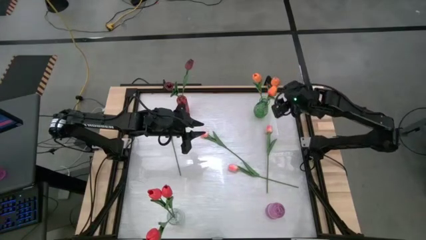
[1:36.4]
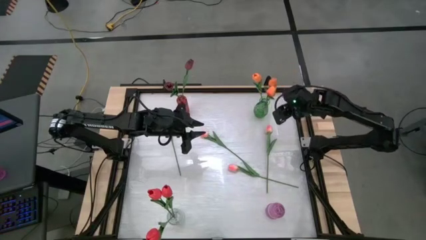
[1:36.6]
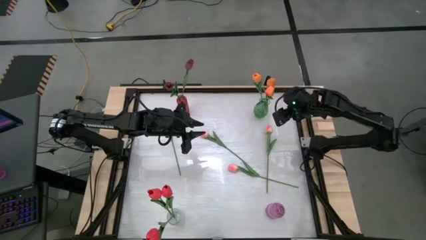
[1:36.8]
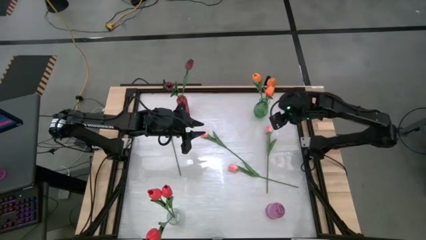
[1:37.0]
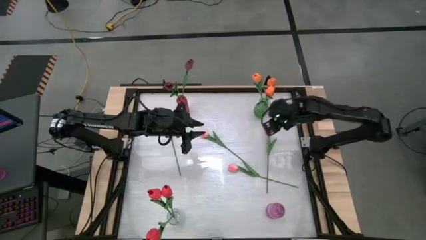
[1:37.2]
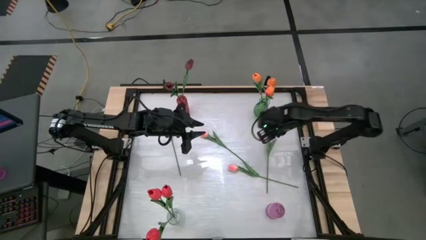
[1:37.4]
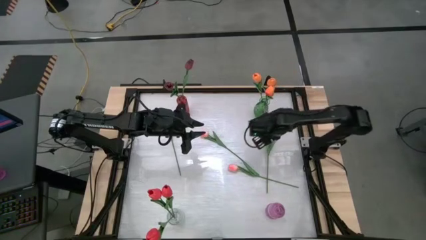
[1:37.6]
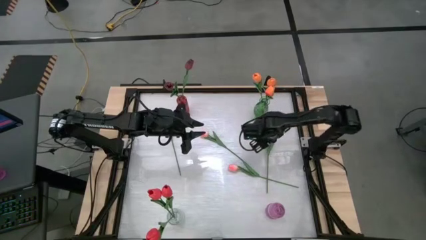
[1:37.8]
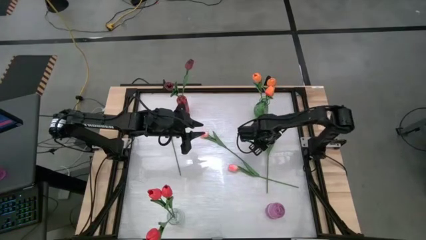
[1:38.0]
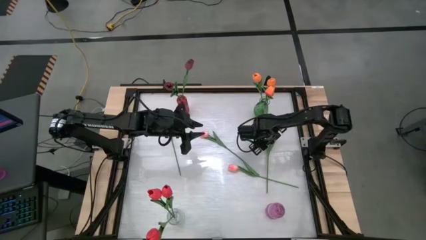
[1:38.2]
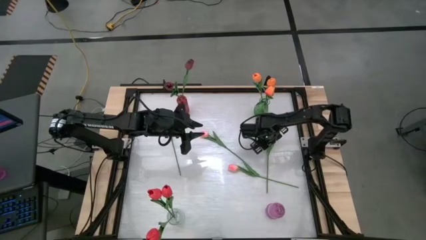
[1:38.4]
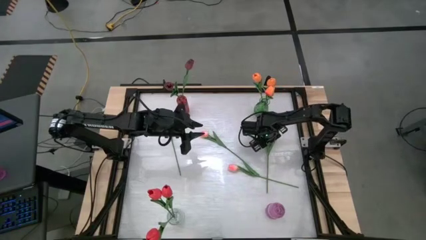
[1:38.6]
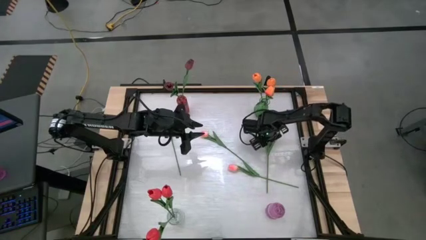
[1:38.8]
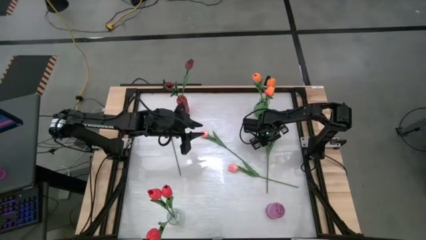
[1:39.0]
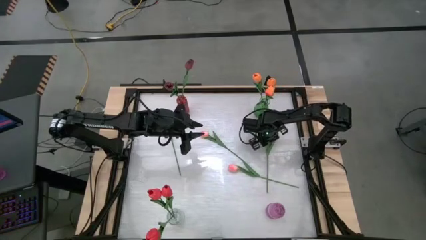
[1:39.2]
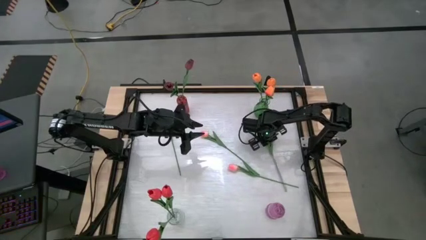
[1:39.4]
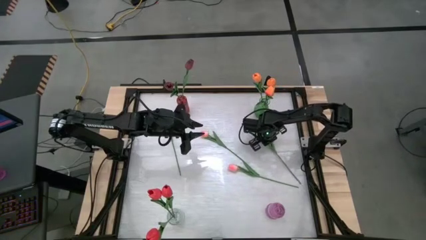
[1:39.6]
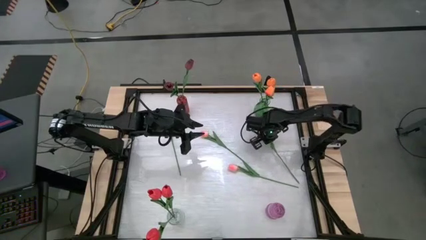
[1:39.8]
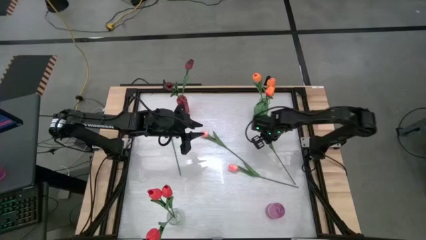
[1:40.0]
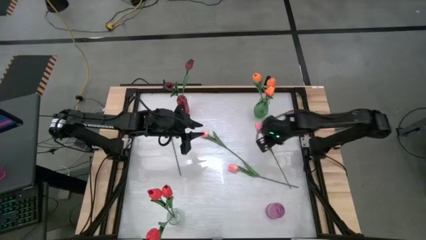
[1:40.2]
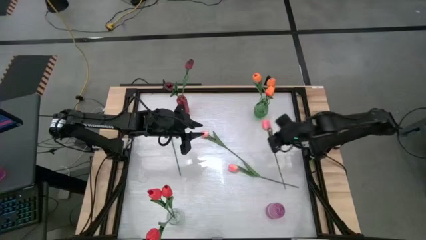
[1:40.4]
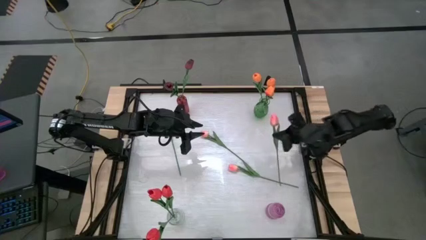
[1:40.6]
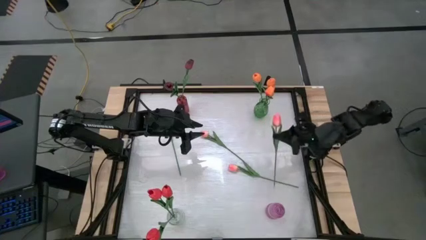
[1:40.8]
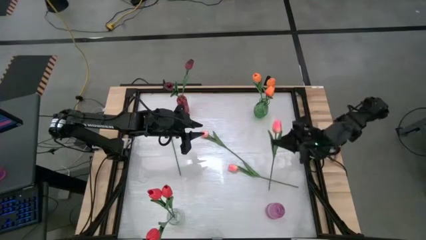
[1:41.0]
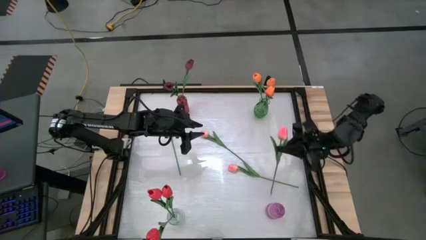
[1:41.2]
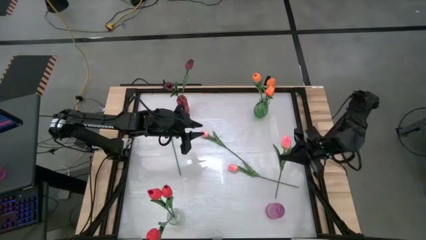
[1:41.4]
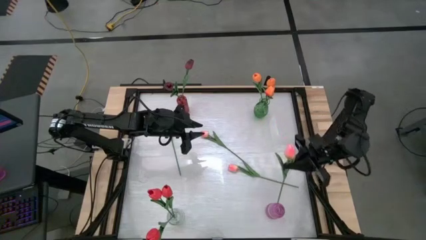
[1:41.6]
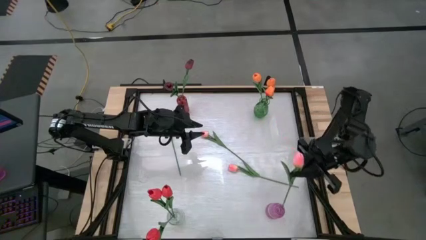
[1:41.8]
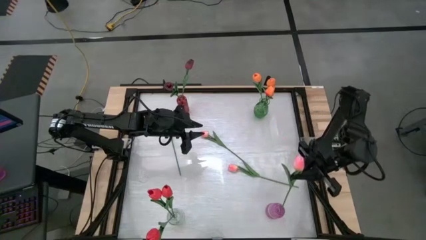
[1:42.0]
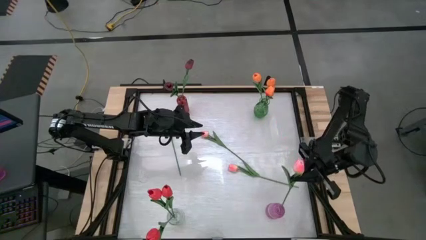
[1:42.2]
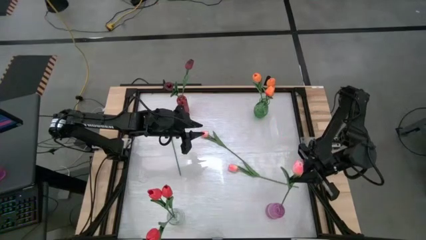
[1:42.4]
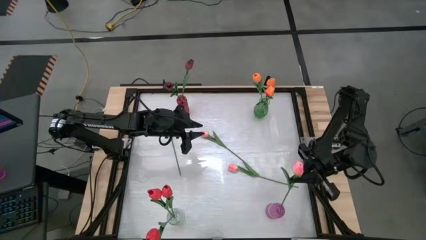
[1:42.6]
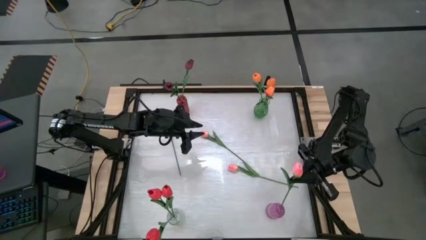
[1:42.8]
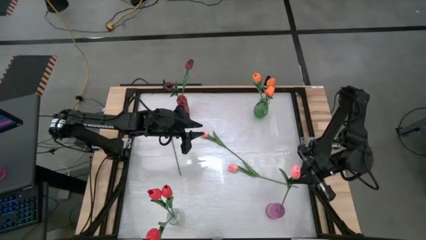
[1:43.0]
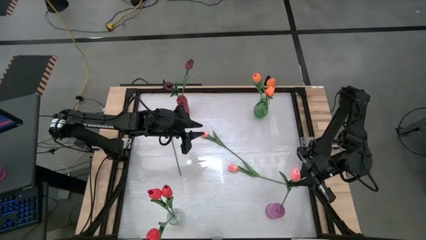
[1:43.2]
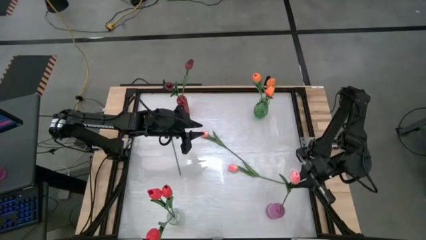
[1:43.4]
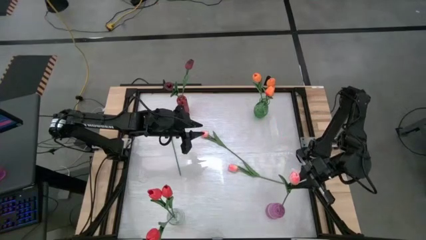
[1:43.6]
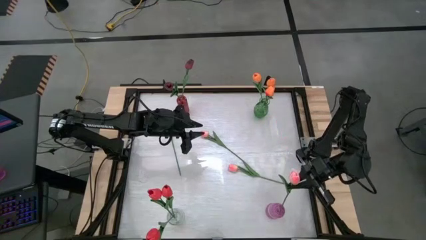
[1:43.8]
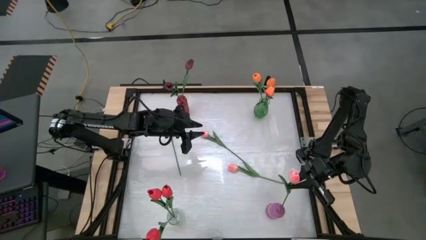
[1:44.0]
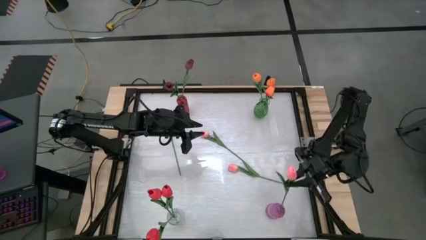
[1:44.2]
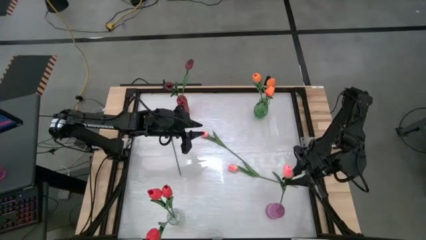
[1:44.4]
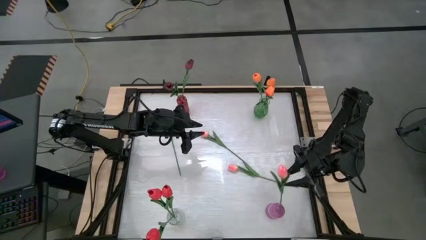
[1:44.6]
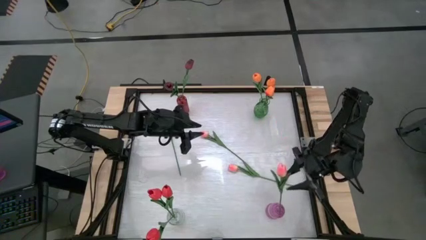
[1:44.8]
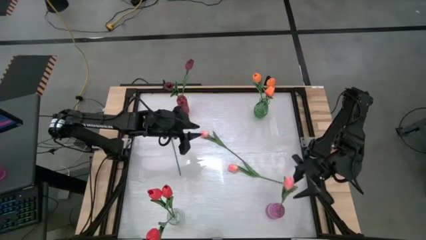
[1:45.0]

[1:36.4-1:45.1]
Task: Sort flowers into vase by color
Put the pink flower into the purple vase

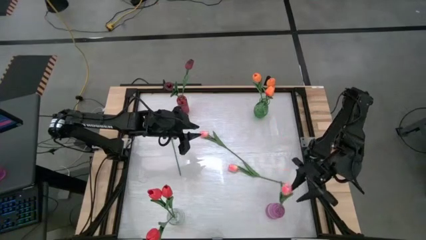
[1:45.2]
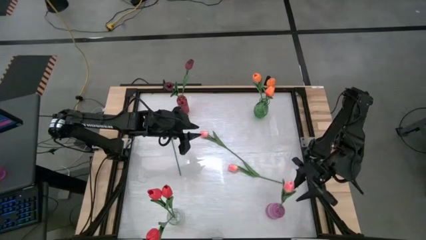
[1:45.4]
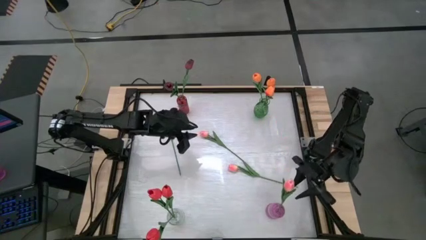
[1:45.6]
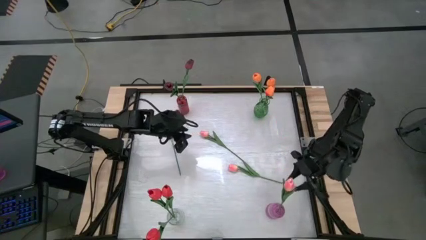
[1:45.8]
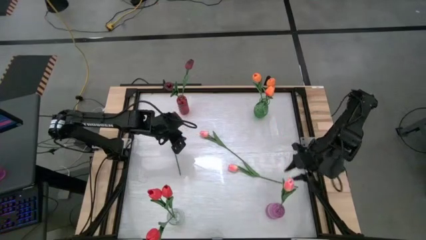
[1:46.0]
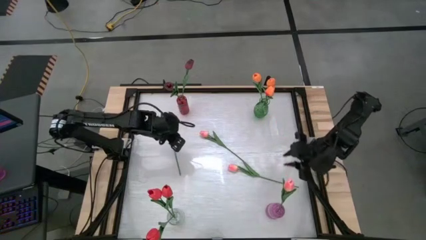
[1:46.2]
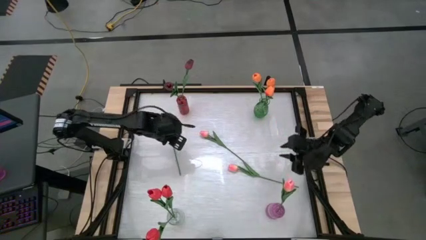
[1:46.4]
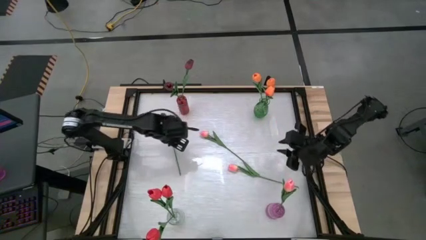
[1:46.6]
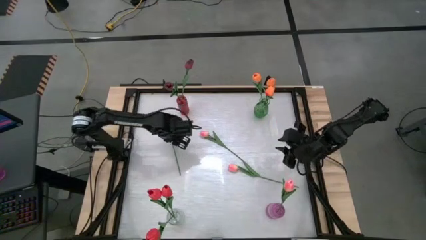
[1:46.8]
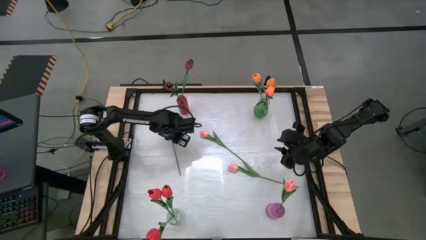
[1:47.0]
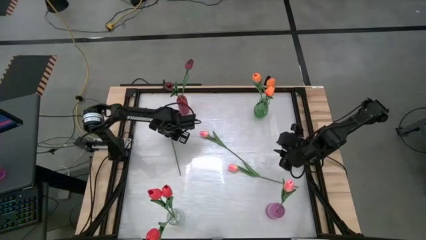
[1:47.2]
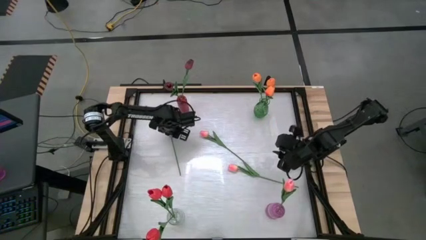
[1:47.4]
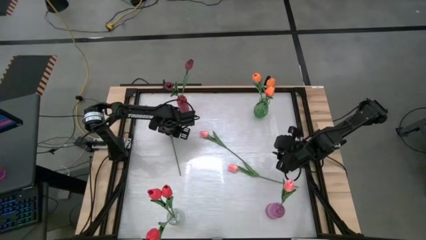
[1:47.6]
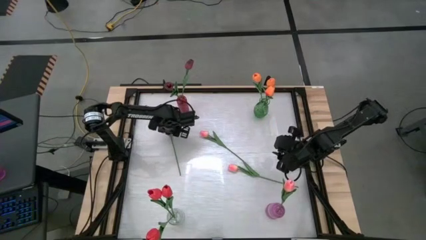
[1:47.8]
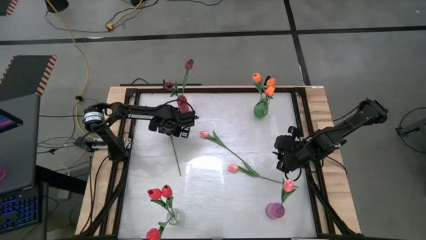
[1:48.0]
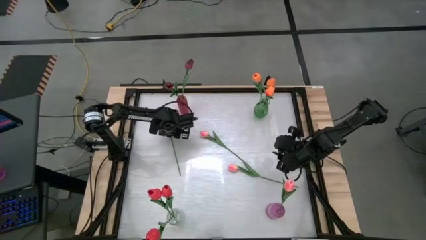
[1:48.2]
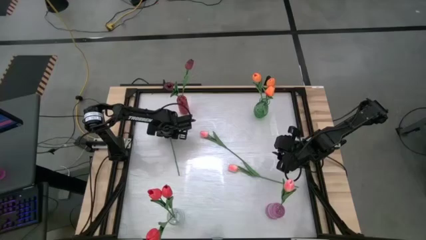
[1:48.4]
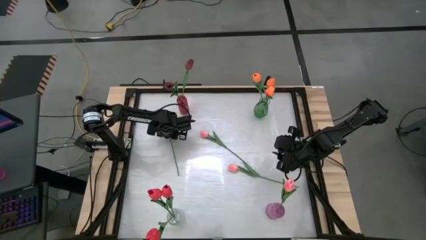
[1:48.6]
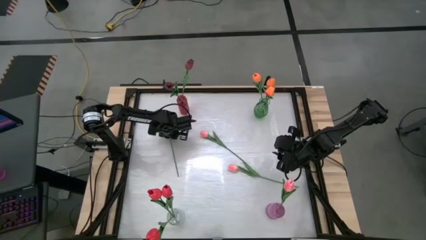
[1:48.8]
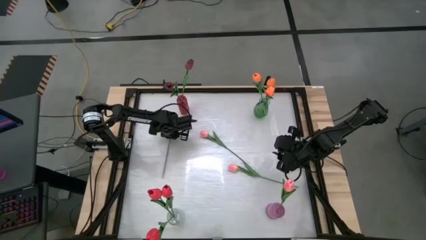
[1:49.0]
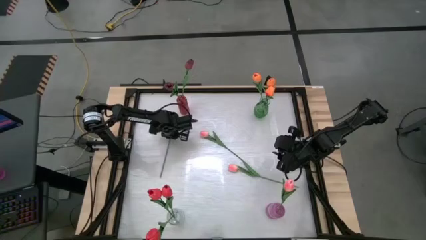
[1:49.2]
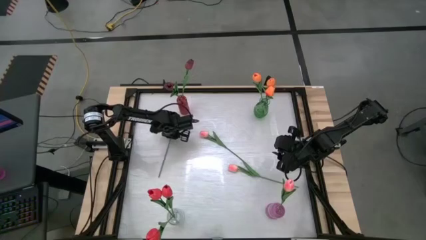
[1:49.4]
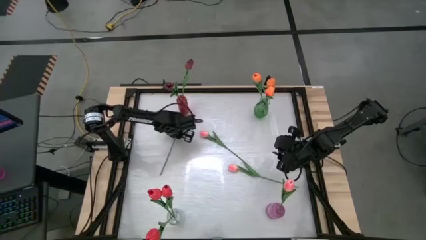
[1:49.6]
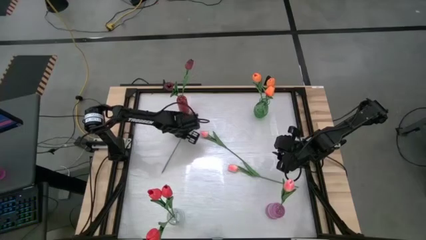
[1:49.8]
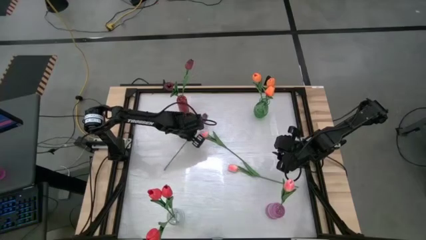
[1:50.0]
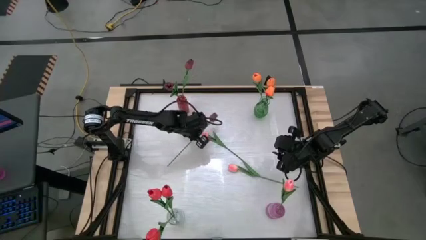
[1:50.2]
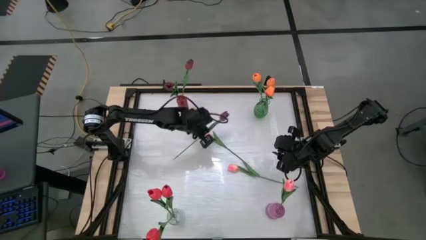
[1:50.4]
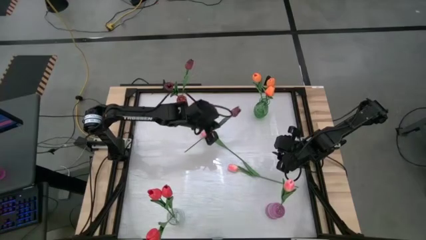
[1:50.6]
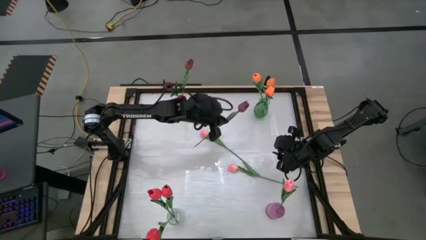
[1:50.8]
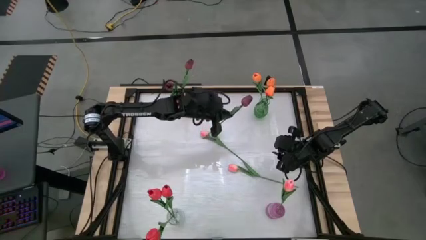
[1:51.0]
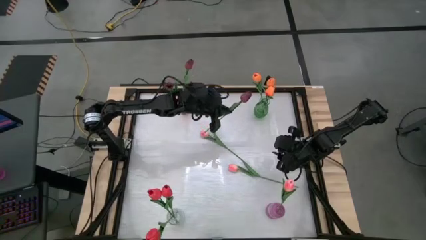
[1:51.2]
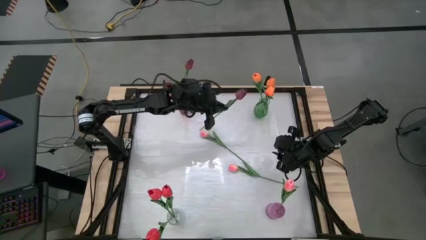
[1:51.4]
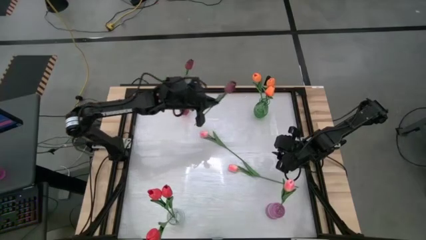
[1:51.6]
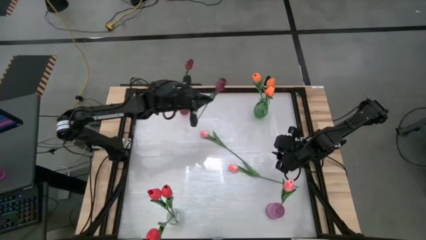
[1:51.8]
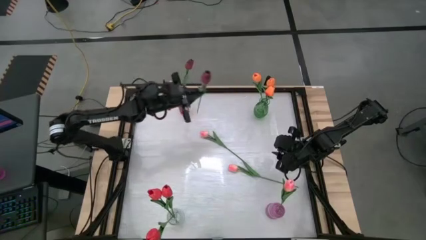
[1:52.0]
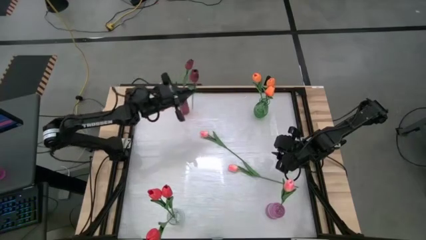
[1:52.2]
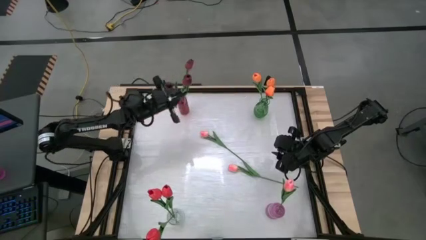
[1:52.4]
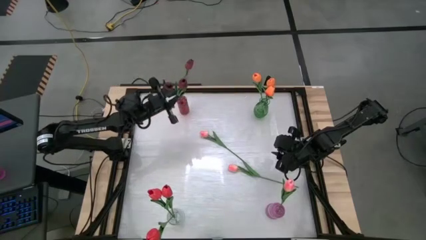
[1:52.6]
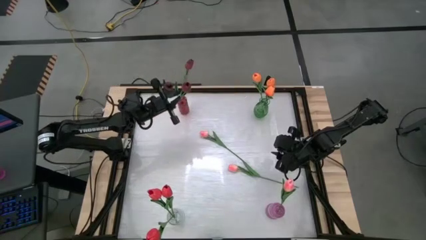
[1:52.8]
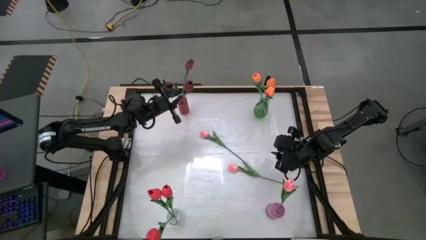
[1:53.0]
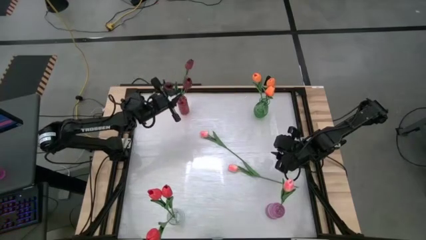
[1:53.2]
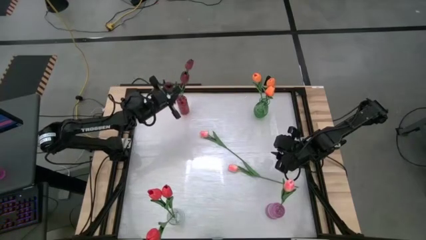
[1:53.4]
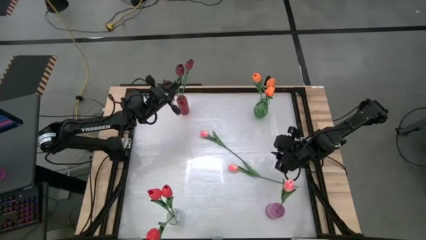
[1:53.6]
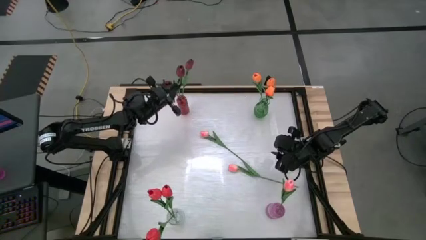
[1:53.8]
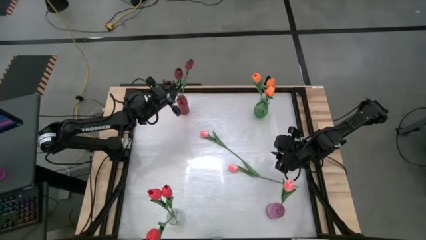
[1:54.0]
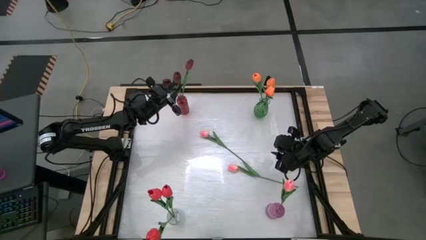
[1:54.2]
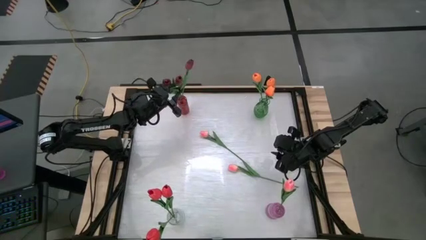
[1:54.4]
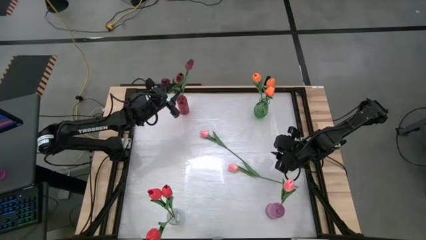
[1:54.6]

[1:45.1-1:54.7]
Put the dark red flower into the red vase
